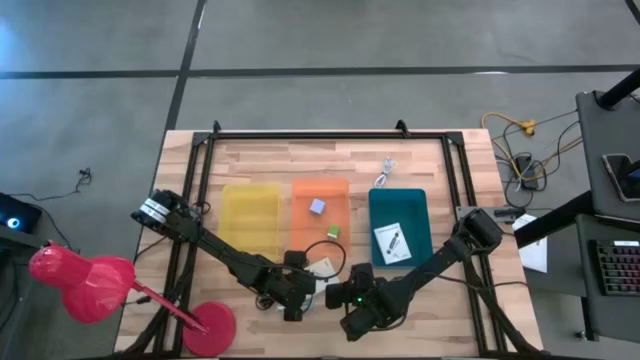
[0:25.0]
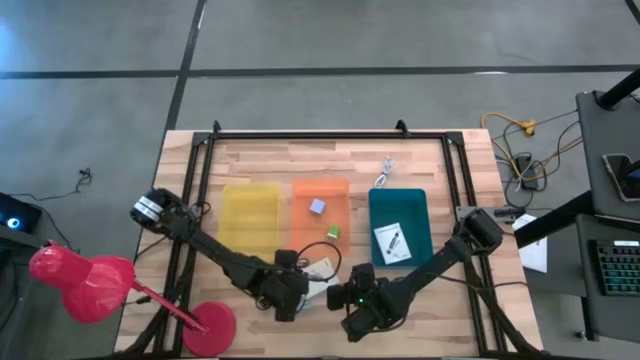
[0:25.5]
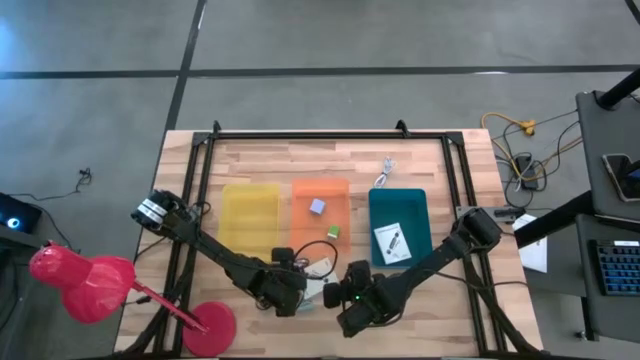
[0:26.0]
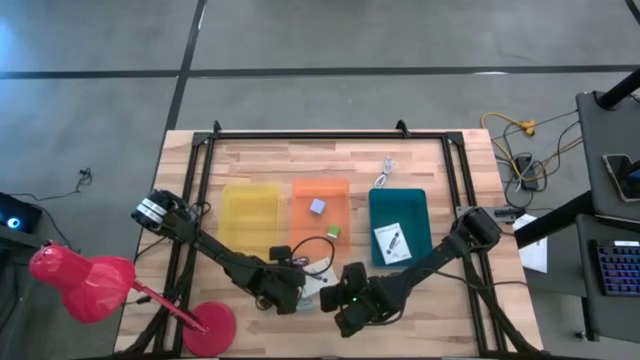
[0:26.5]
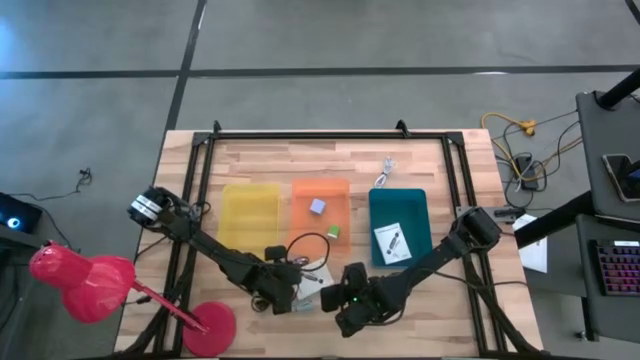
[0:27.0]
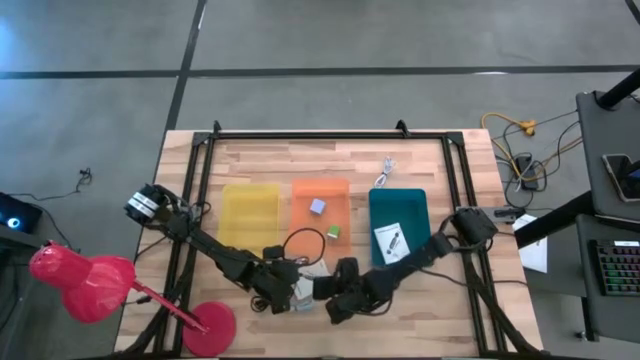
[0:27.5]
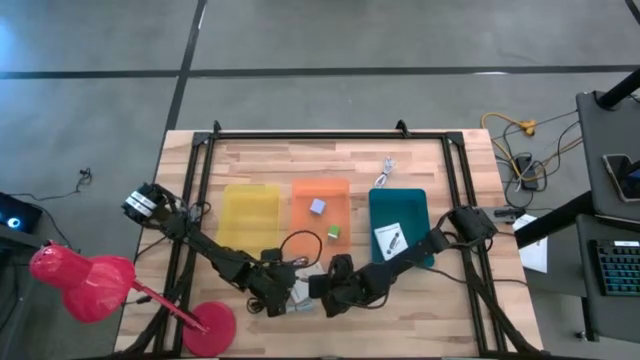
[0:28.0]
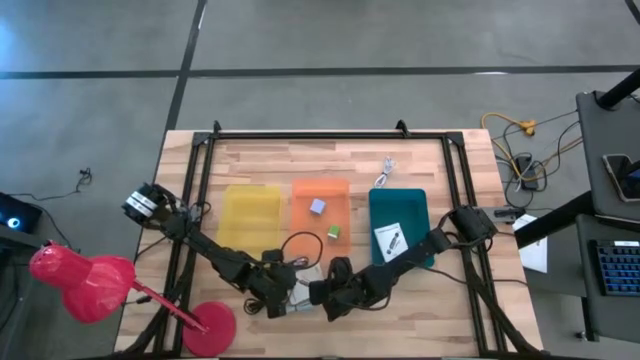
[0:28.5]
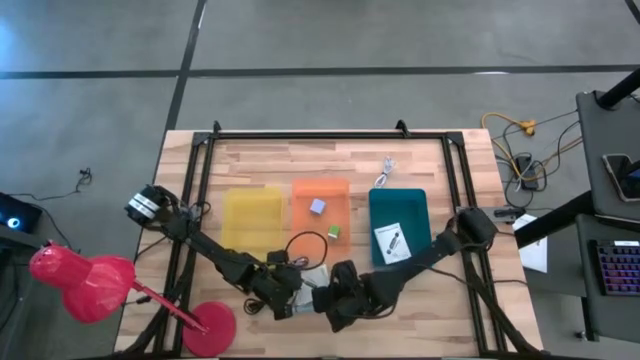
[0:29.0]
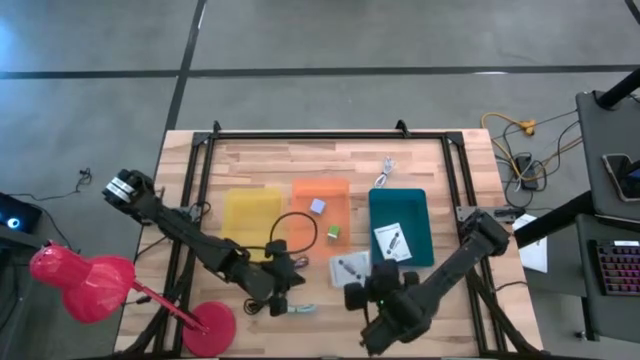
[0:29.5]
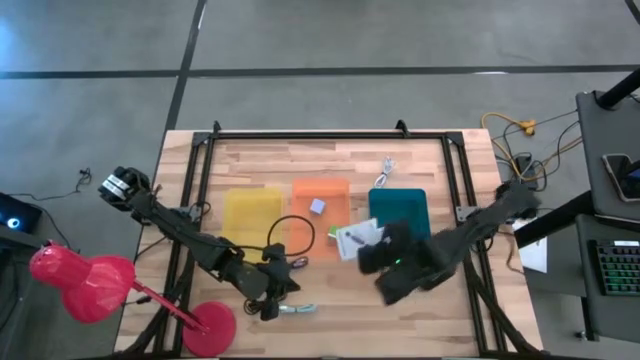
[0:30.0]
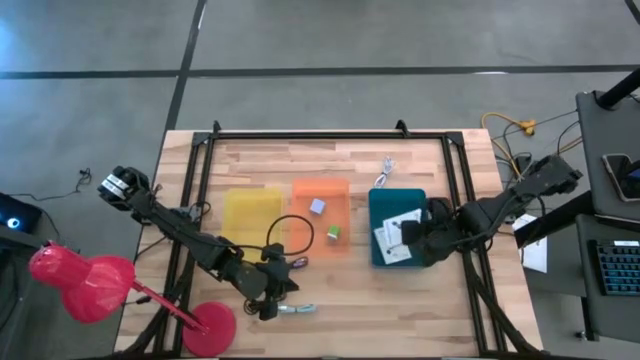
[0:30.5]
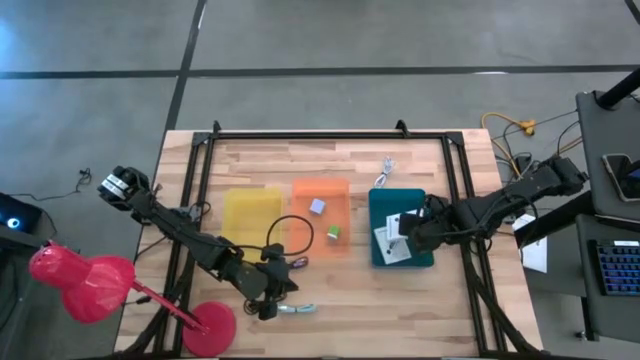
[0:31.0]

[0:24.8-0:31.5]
Task: Pick and place items into bin
Put the white card reader box into the blue bin

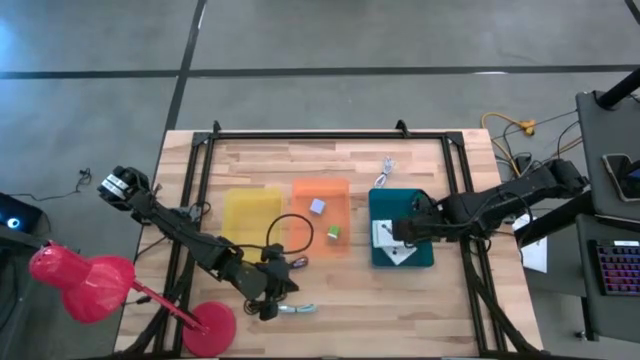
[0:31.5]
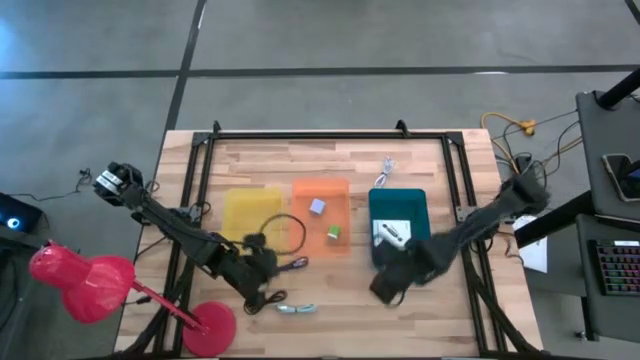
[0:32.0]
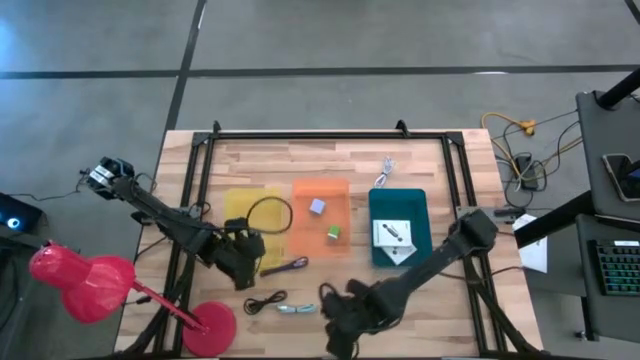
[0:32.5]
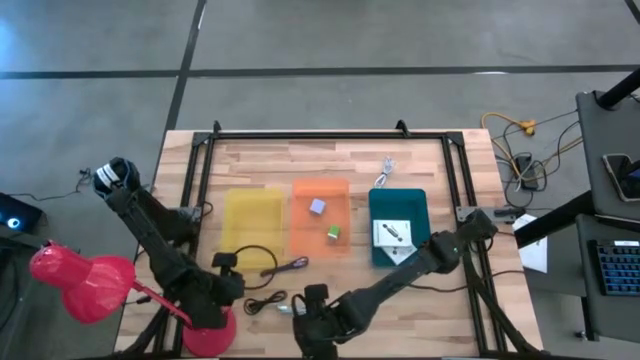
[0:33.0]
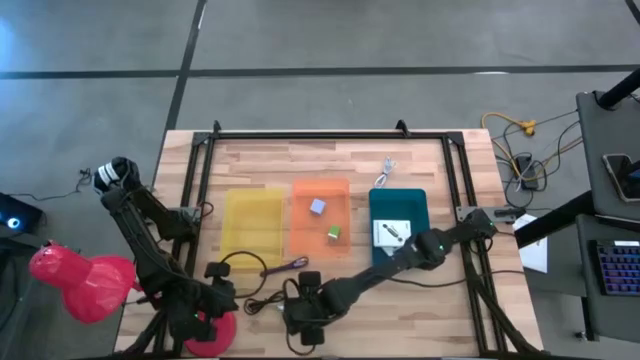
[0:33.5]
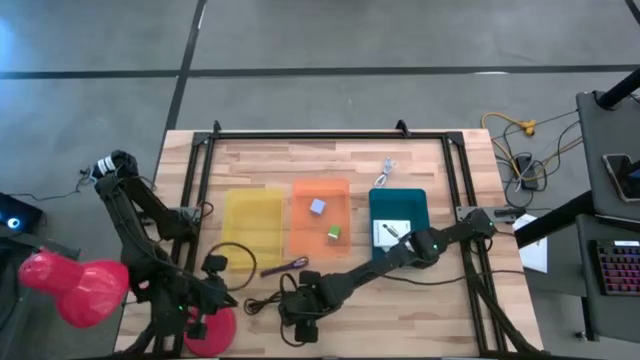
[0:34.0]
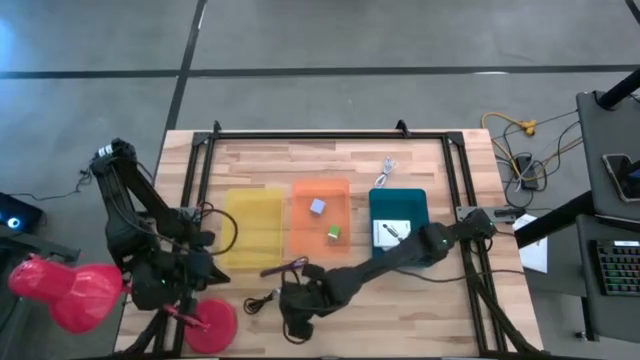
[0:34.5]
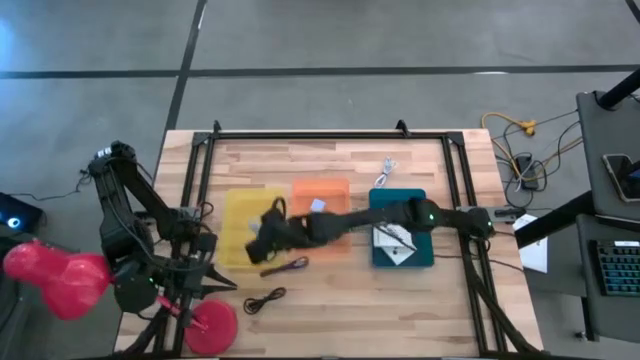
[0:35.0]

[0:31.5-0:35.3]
Put the light blue charger cable into the yellow bin

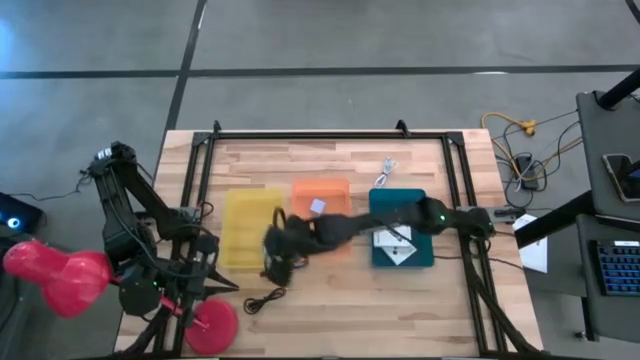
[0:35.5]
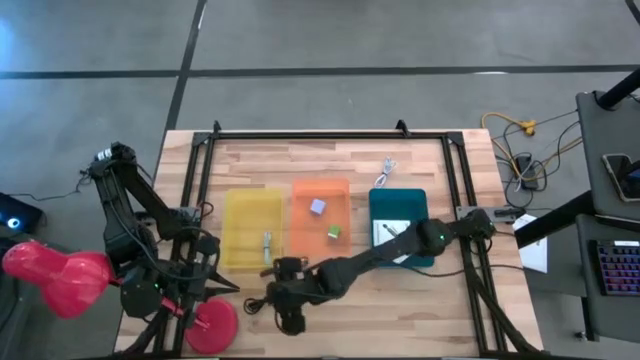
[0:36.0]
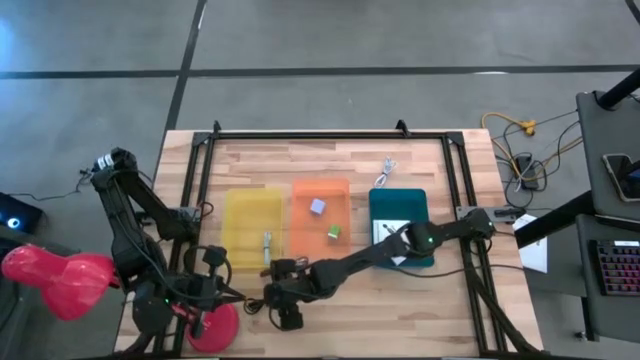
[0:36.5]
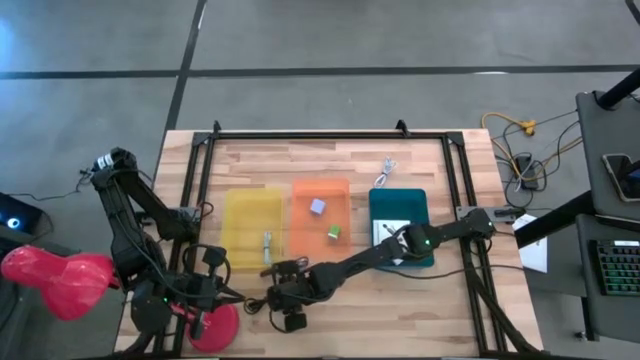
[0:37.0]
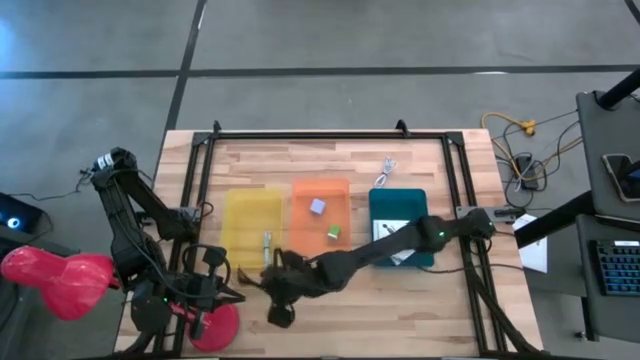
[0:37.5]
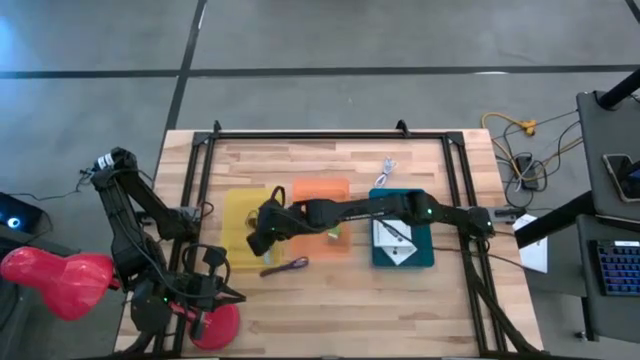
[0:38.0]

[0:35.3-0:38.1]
Put the black charger cable into the yellow bin

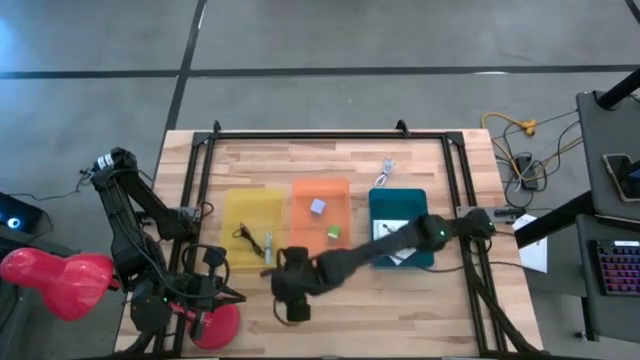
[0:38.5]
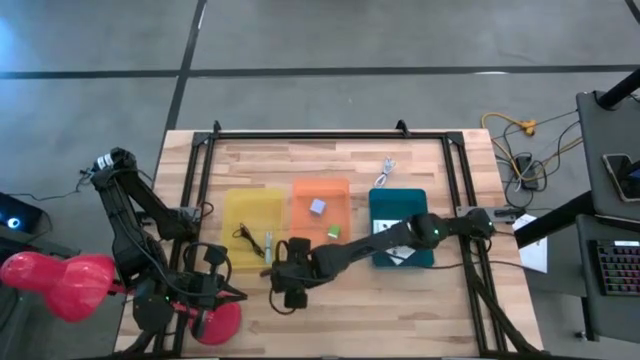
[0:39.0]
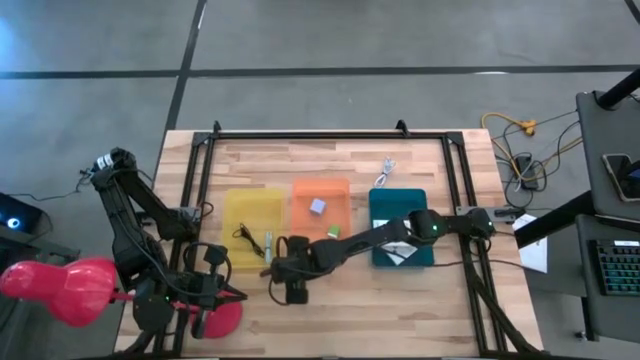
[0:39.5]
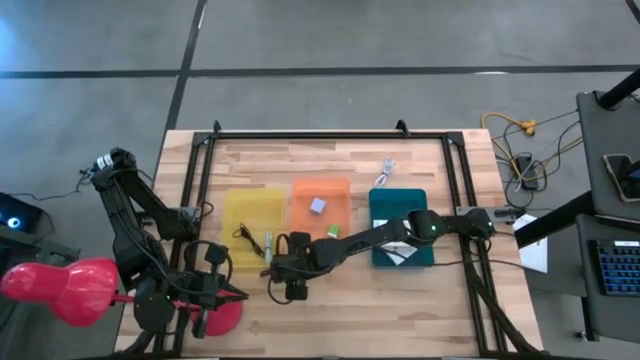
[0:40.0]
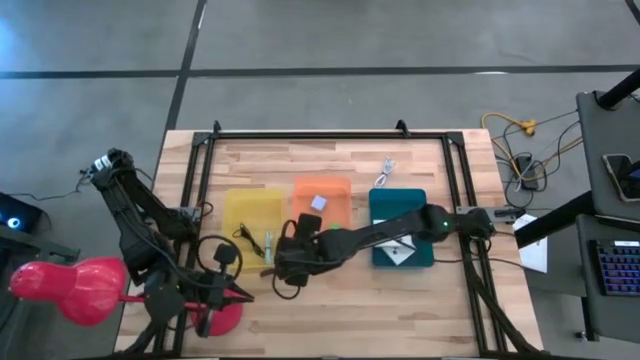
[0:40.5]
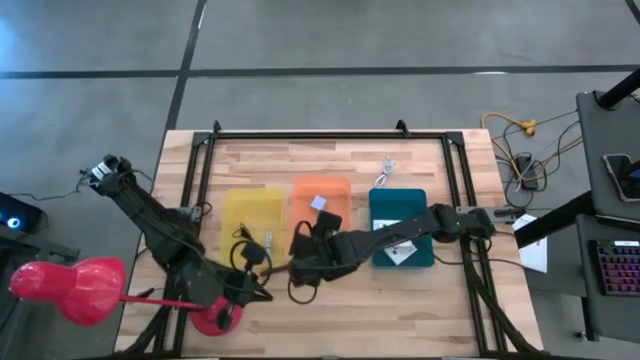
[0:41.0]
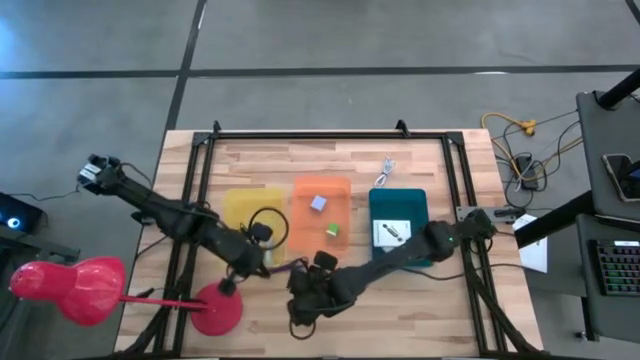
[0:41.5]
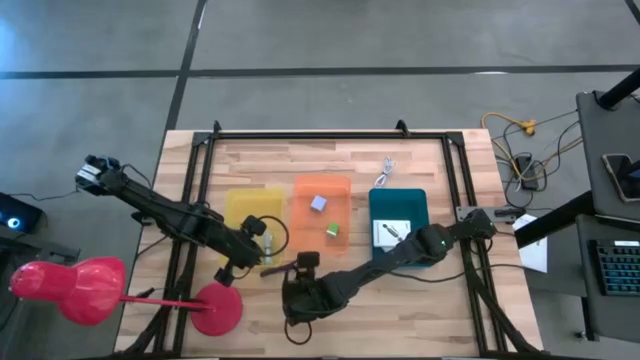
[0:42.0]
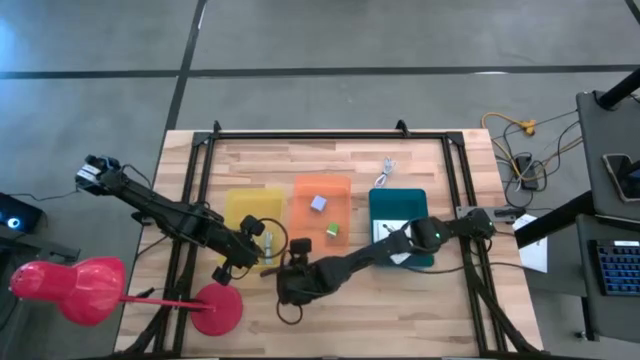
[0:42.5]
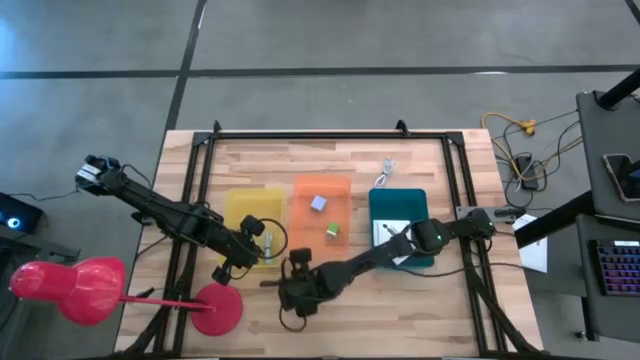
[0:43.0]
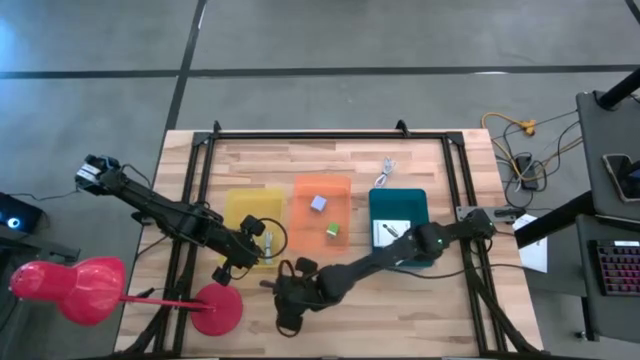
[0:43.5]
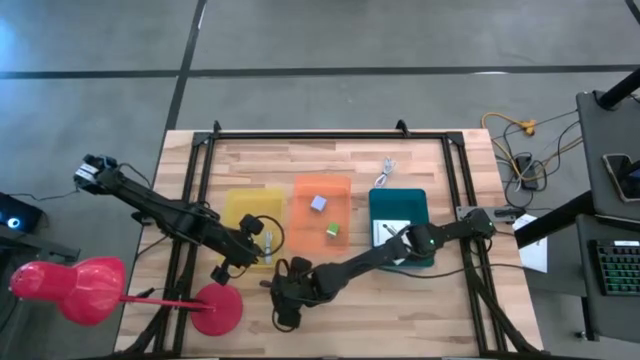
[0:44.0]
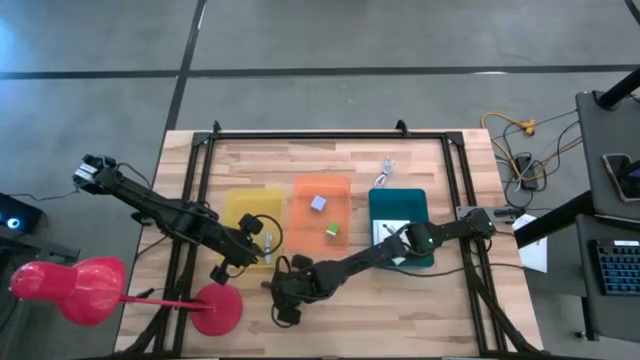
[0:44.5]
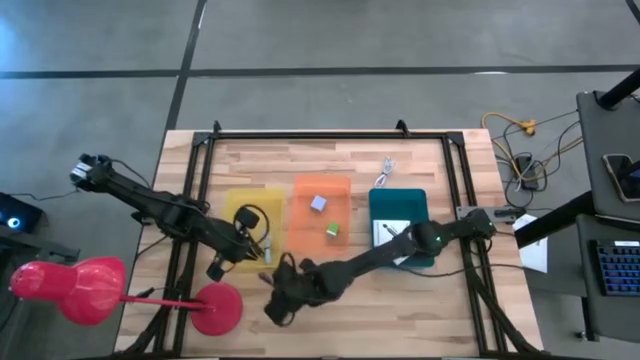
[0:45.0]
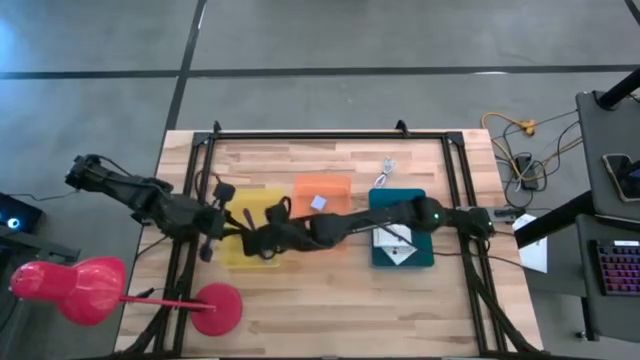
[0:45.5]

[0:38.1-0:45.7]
Put the violet patterned charger cable into the yellow bin
